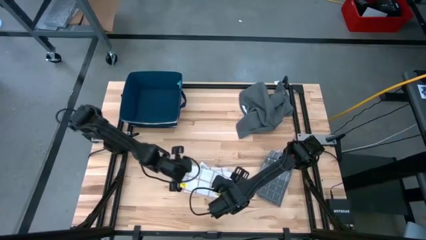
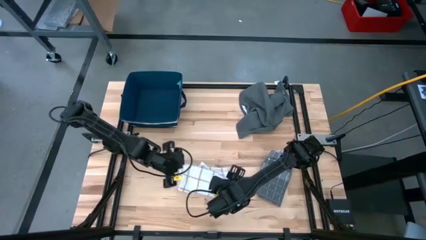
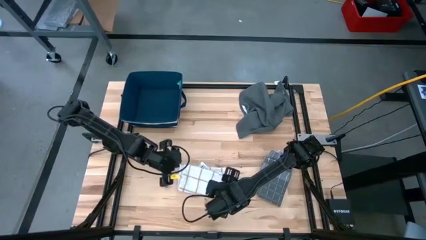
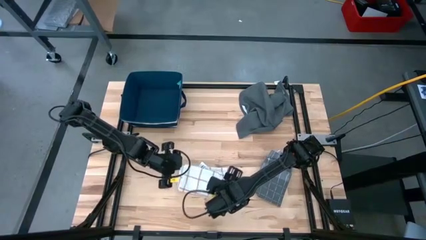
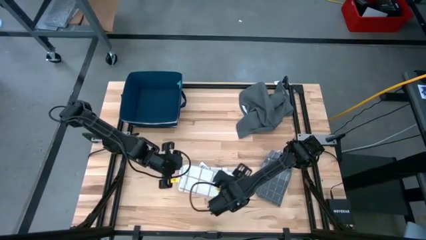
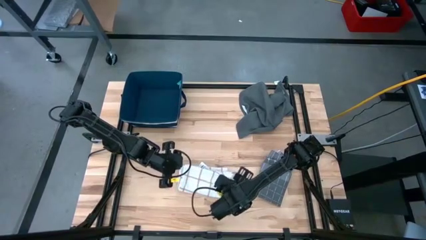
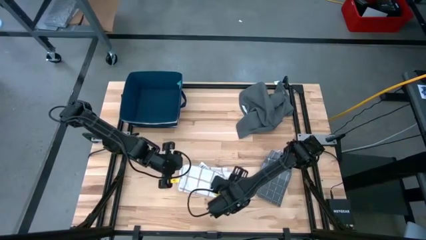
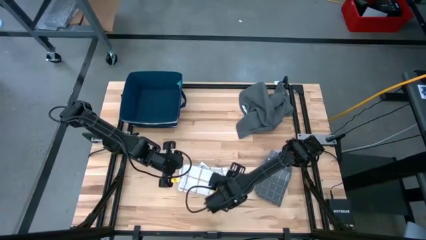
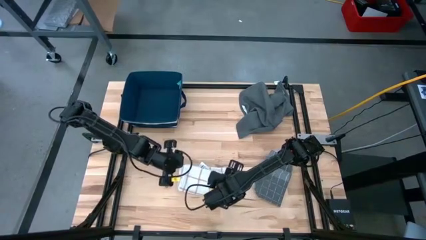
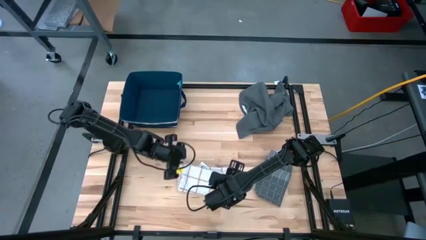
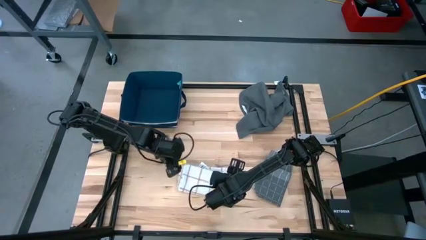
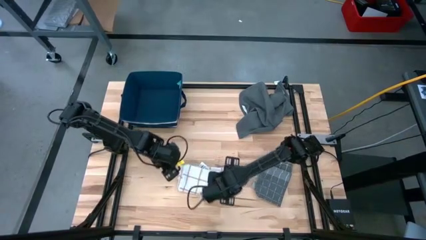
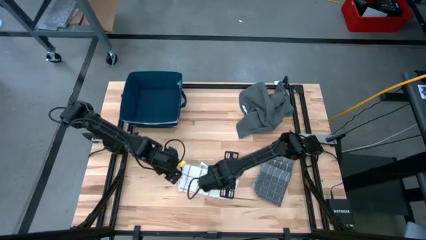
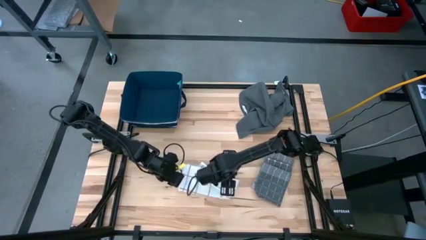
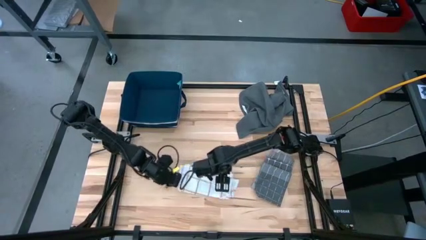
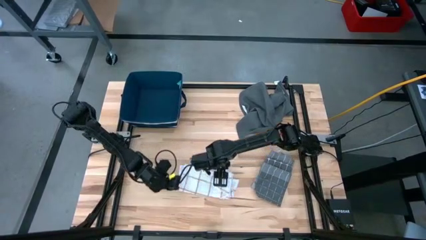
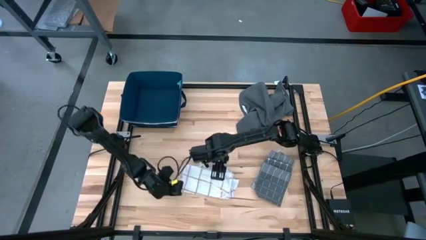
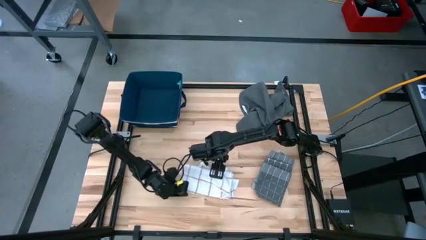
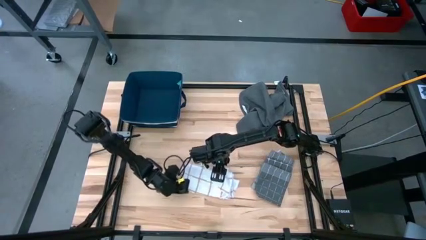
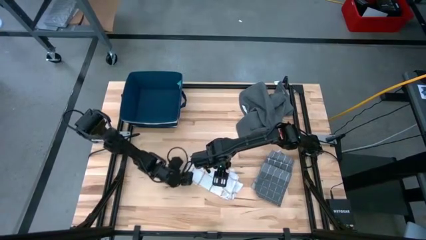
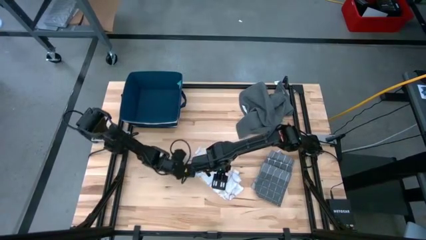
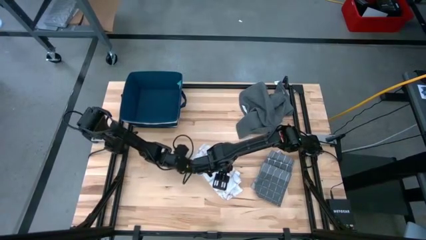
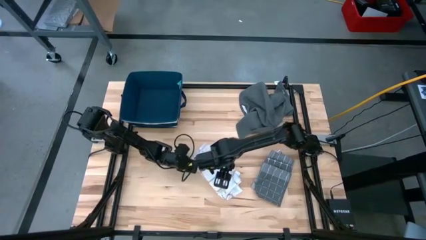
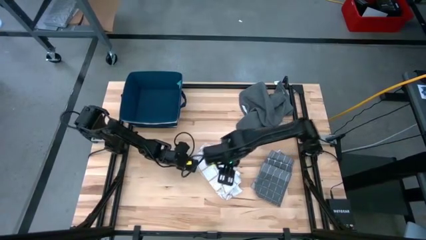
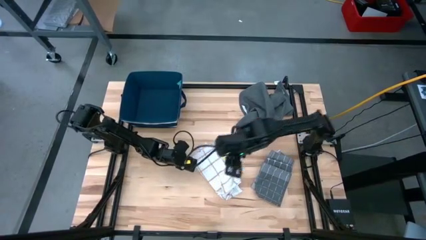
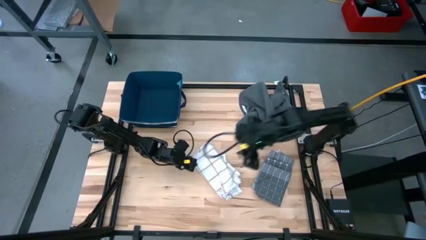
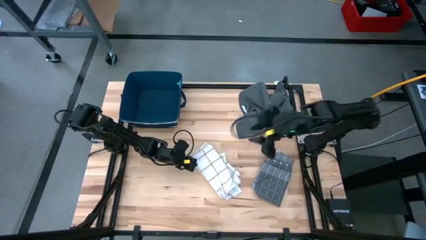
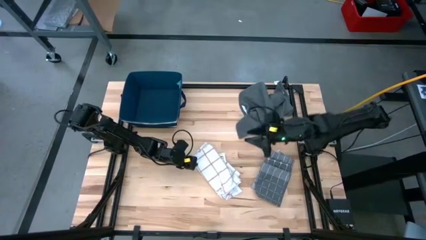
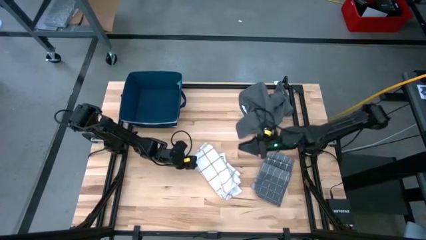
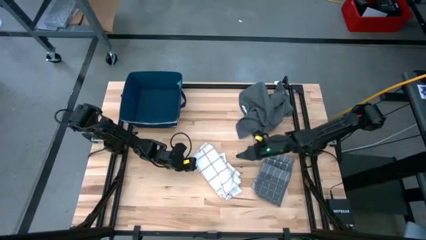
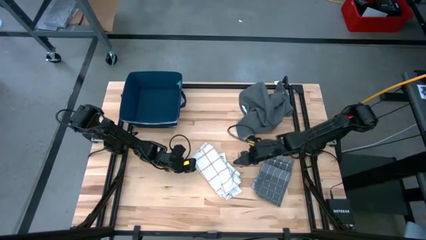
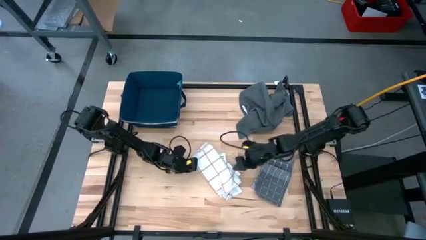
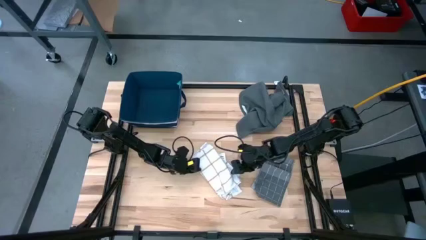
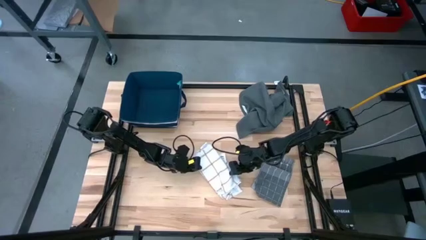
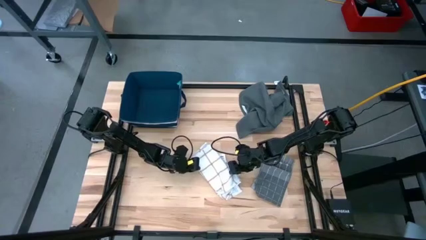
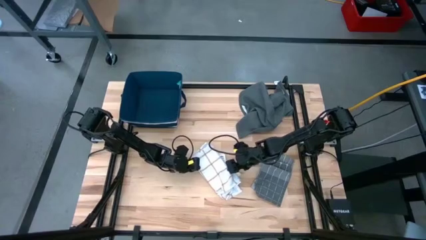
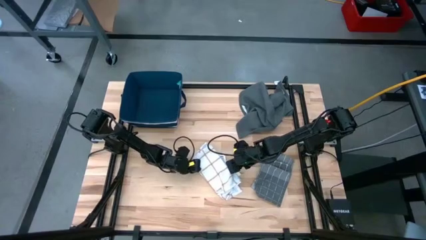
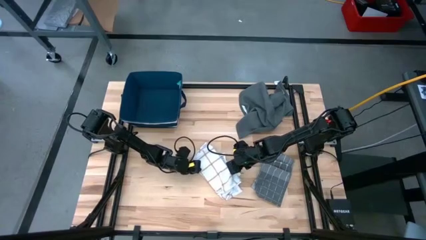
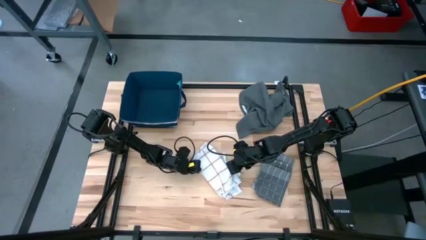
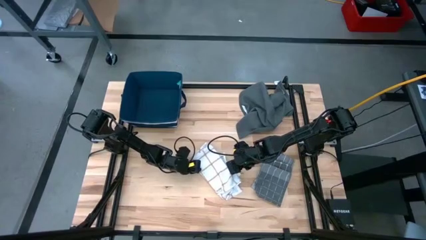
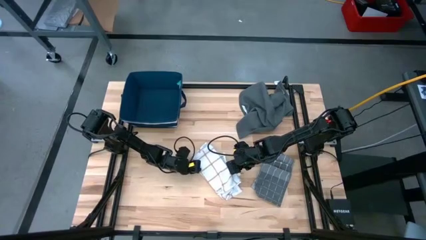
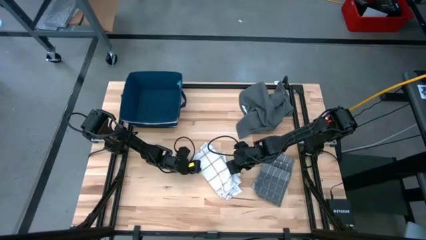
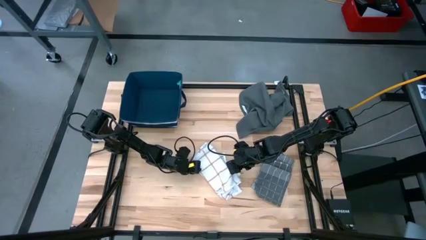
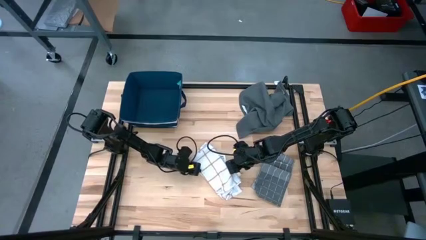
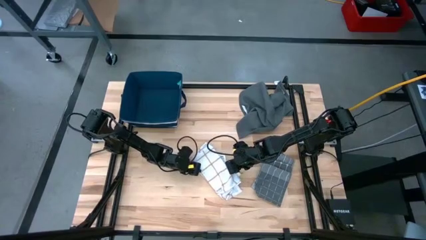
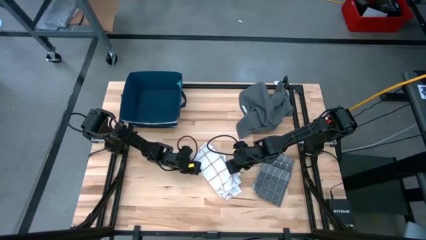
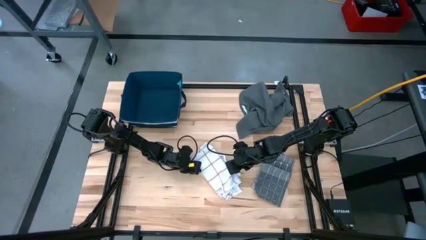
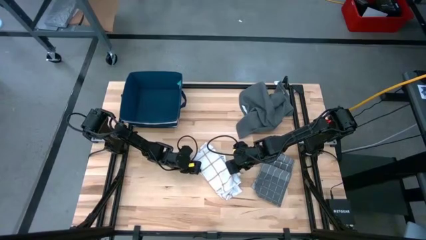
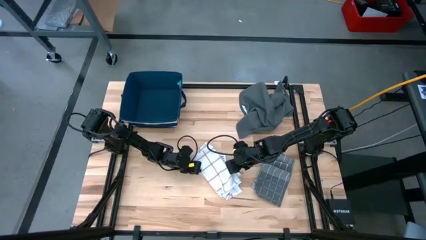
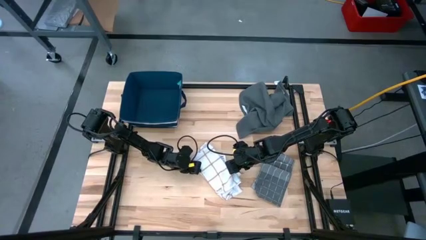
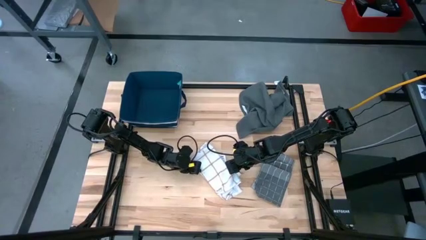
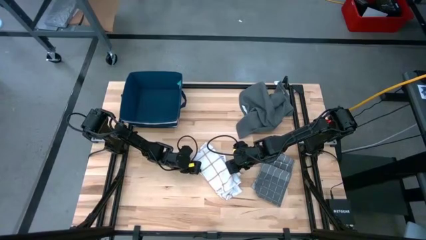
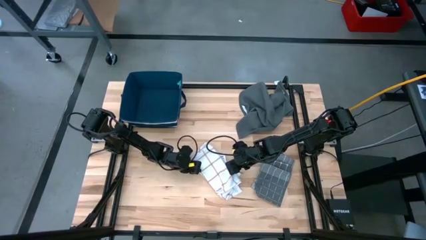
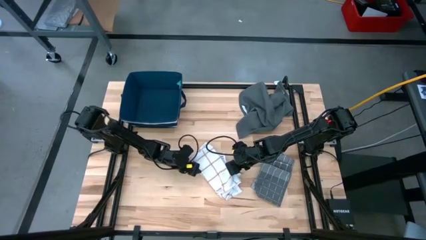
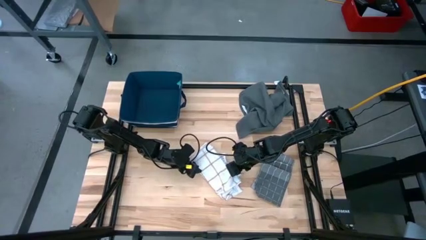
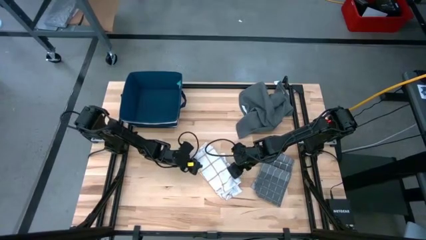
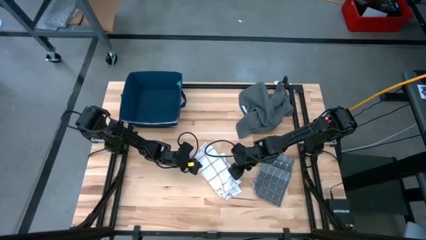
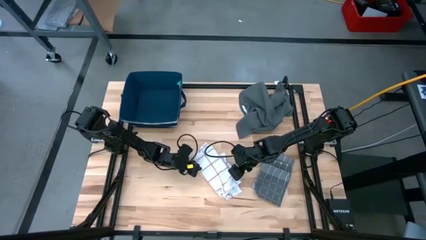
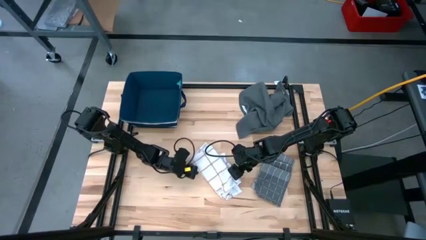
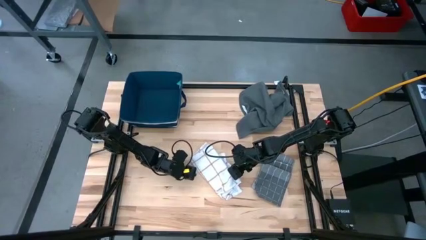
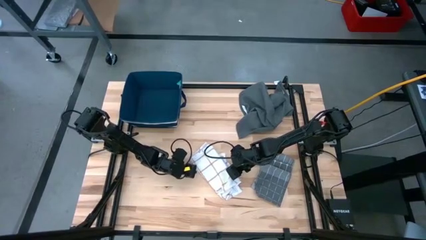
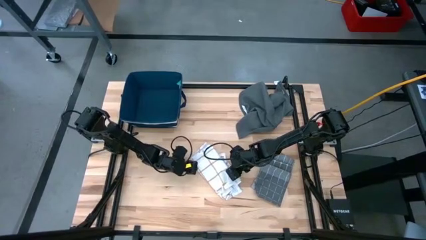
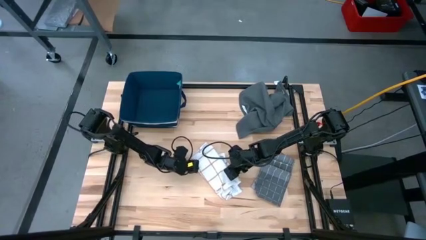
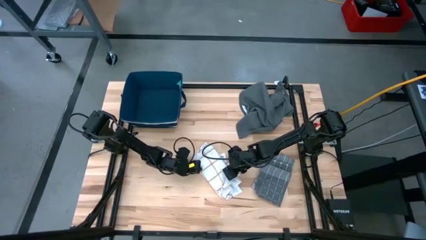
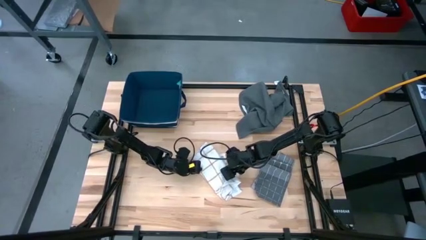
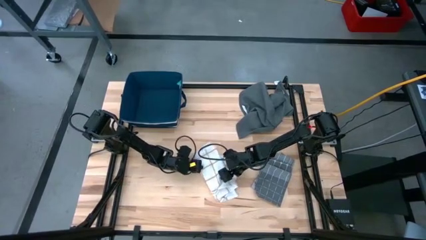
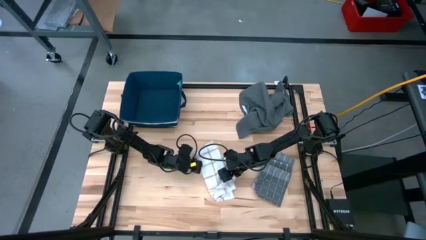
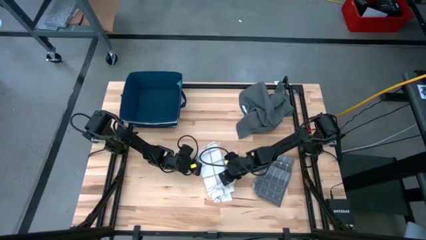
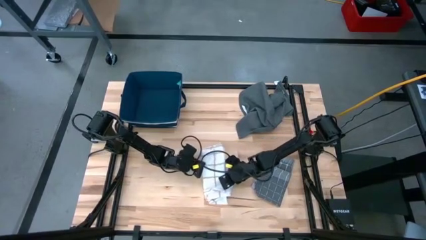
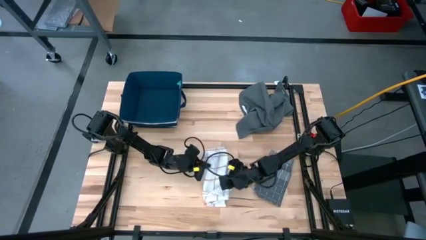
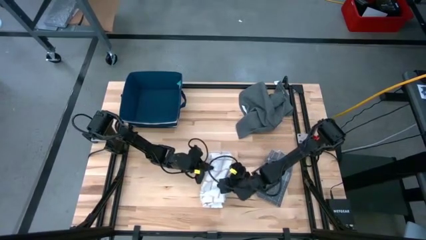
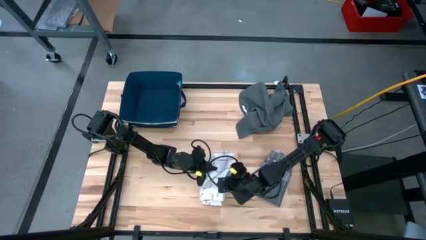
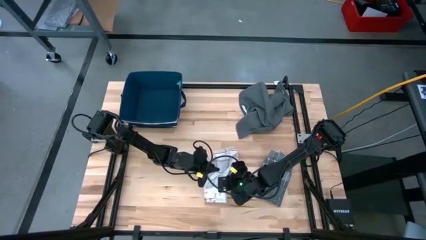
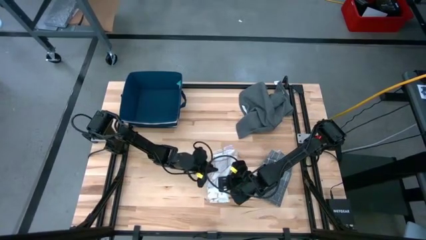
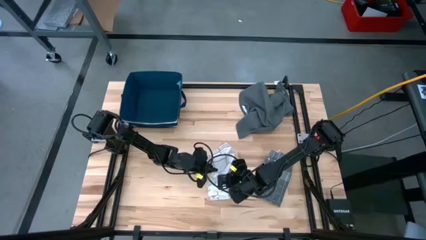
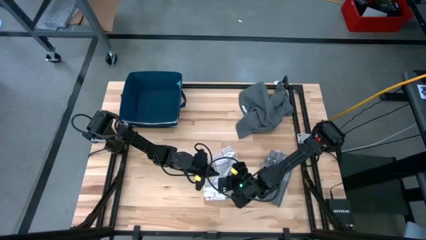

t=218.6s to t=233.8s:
Task: Fold towel
Stack the white towel on top of the gray patterned towel

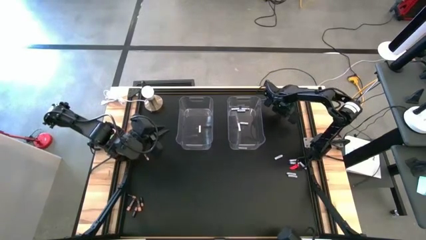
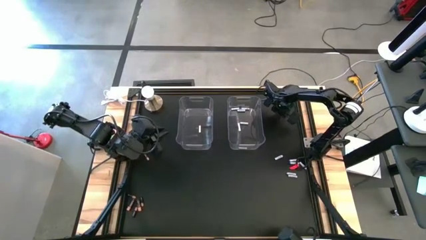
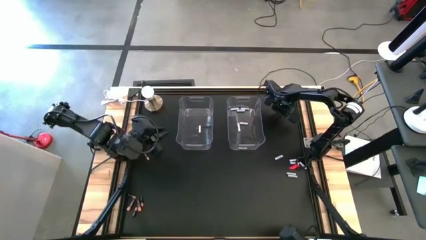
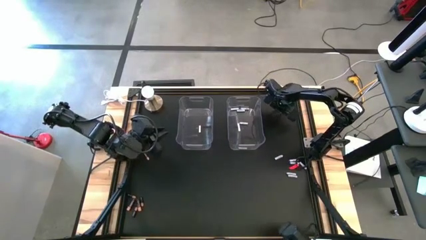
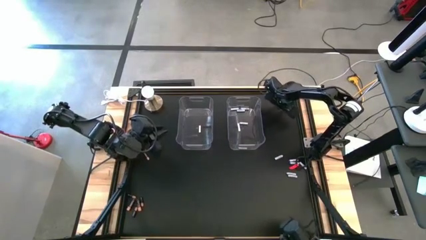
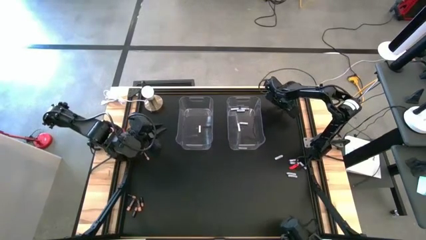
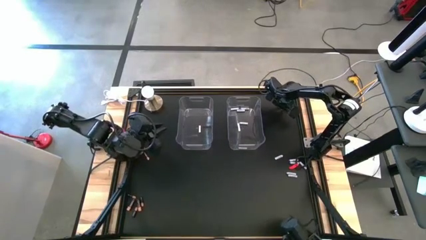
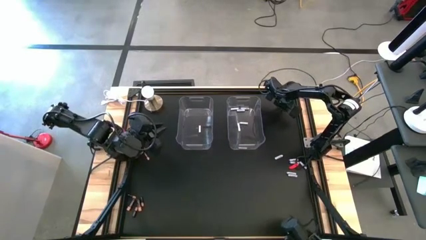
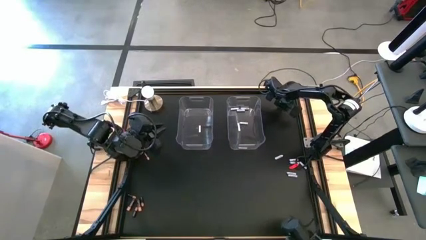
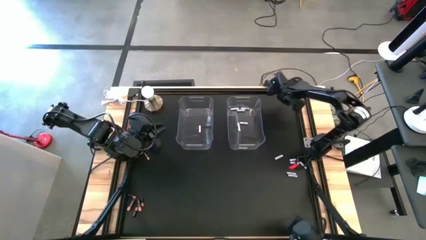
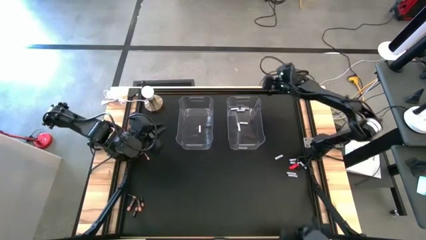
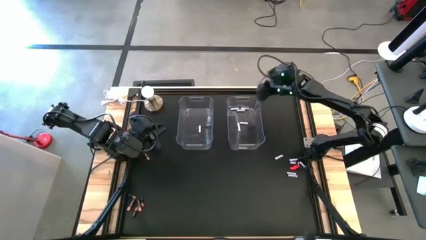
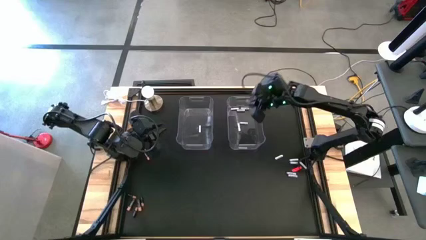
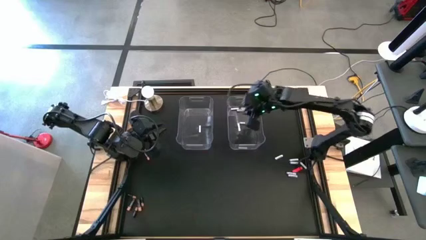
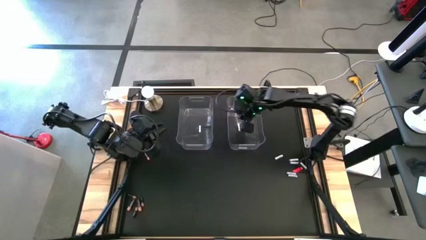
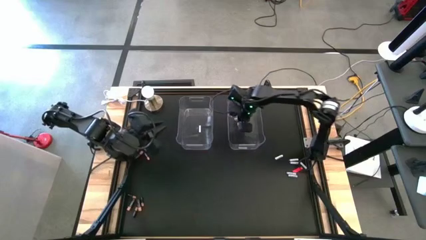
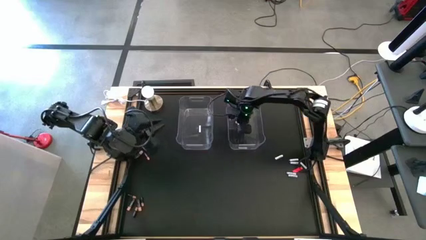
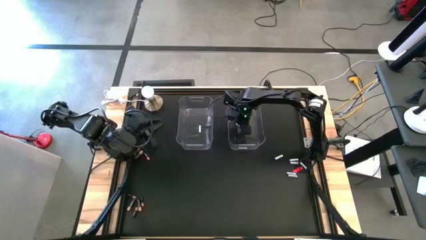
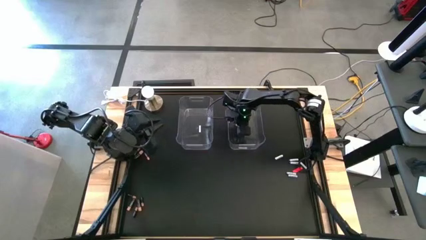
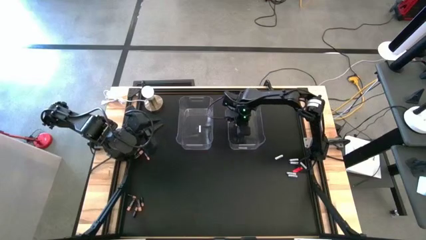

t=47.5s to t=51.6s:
Task: Sort batteries
Put the white battery into the right transparent bin
